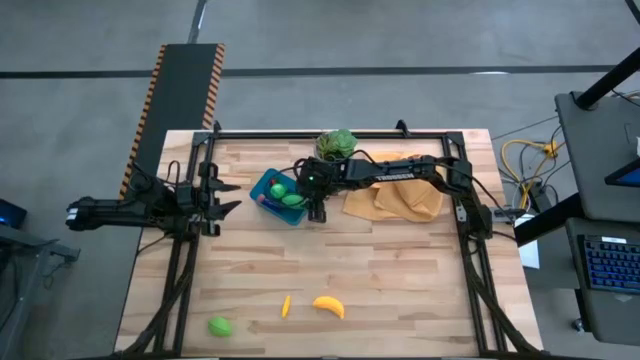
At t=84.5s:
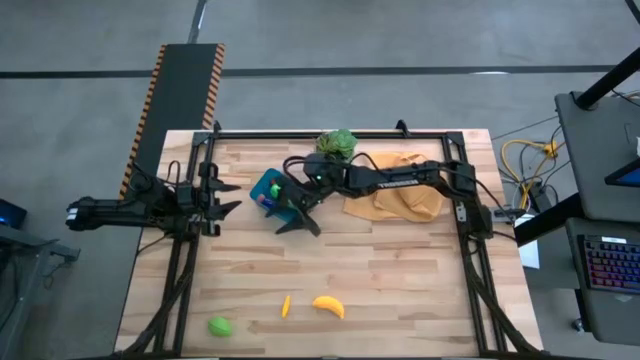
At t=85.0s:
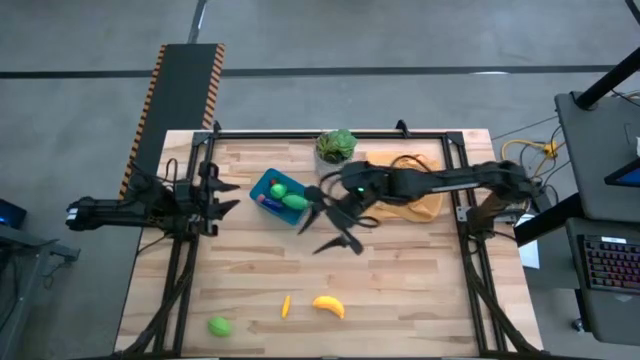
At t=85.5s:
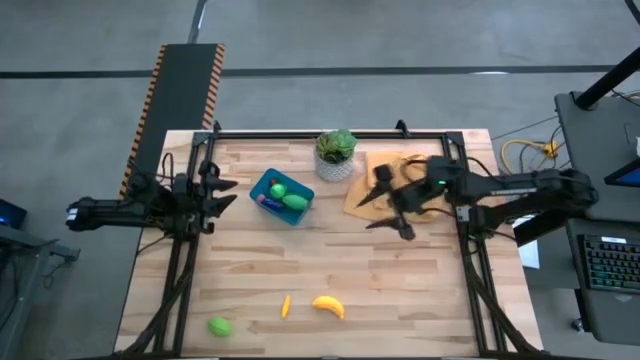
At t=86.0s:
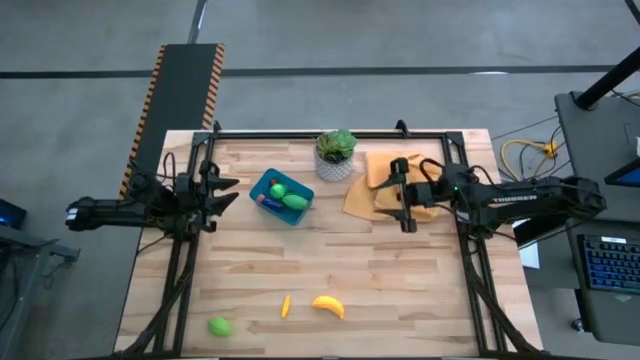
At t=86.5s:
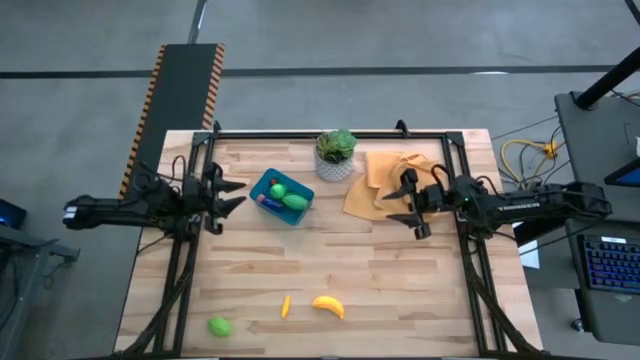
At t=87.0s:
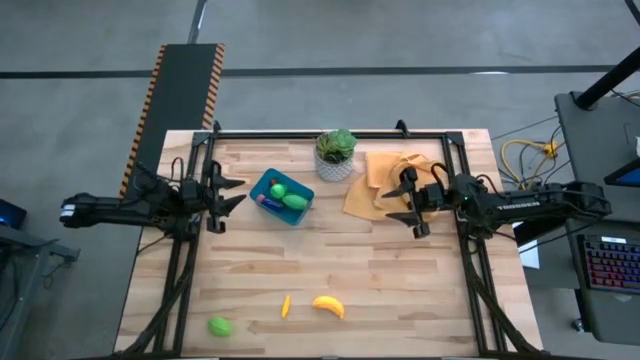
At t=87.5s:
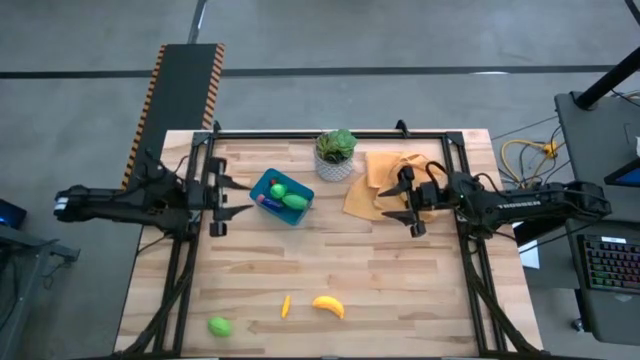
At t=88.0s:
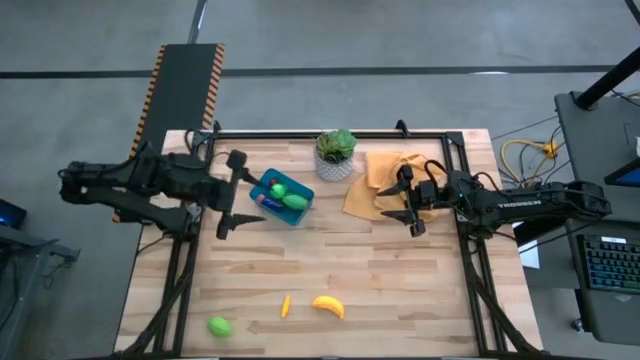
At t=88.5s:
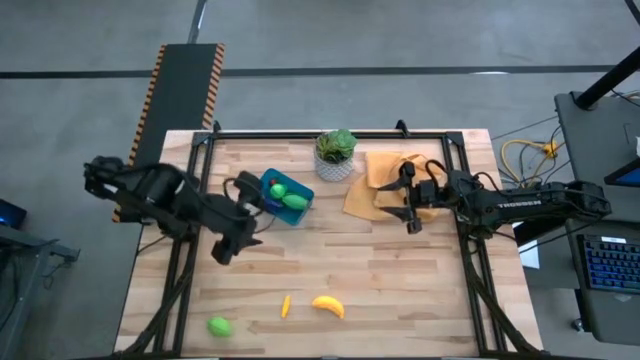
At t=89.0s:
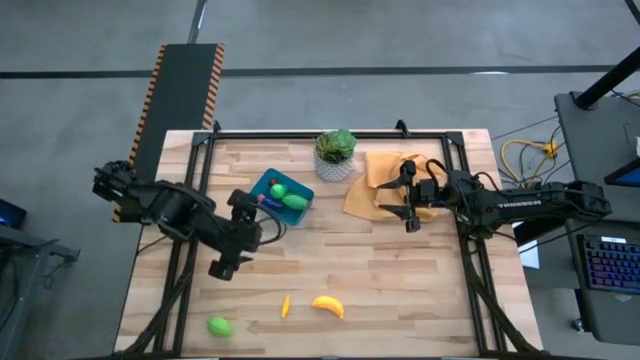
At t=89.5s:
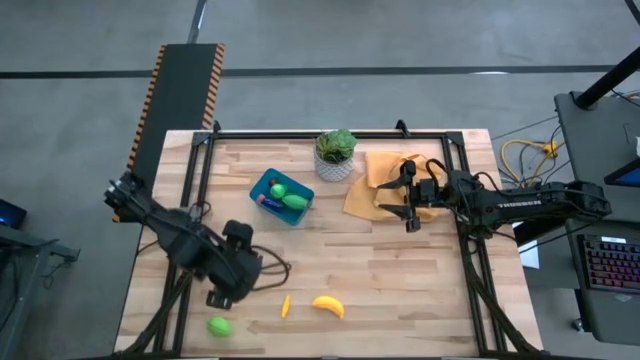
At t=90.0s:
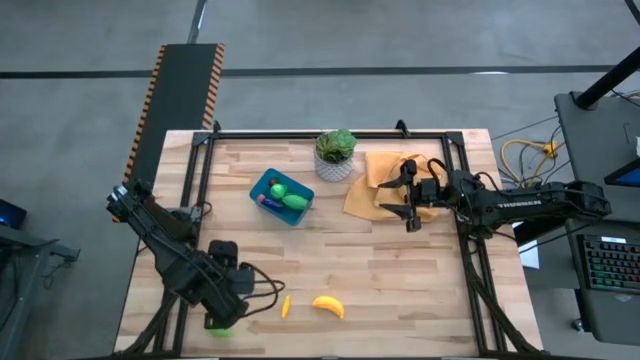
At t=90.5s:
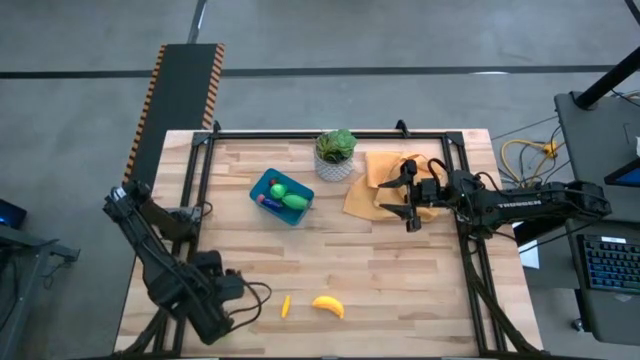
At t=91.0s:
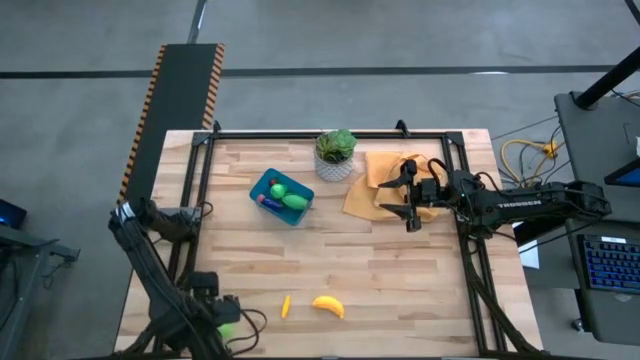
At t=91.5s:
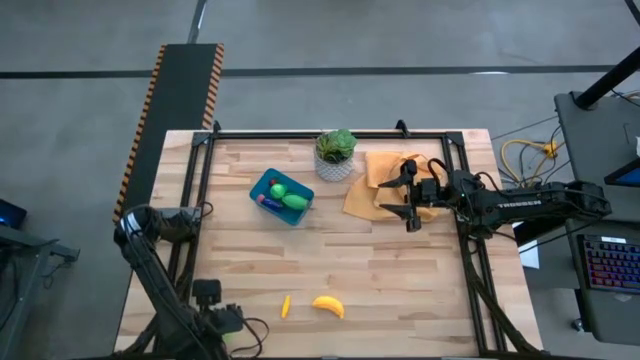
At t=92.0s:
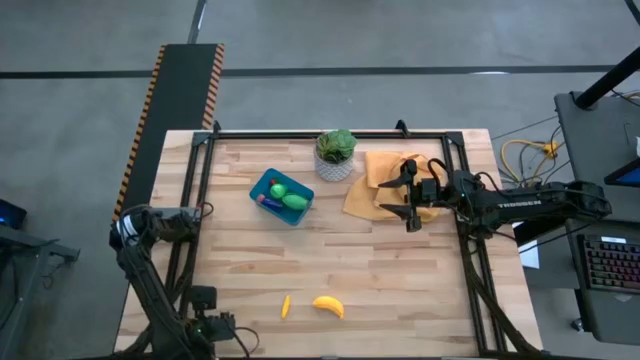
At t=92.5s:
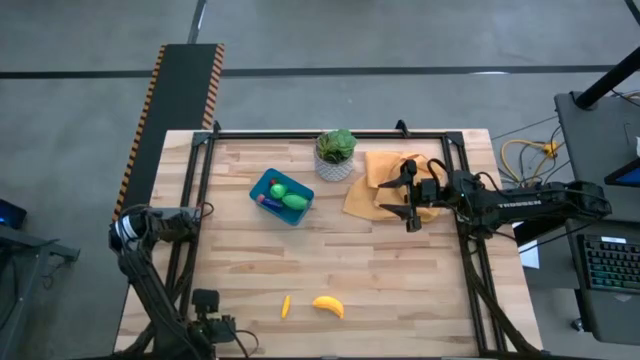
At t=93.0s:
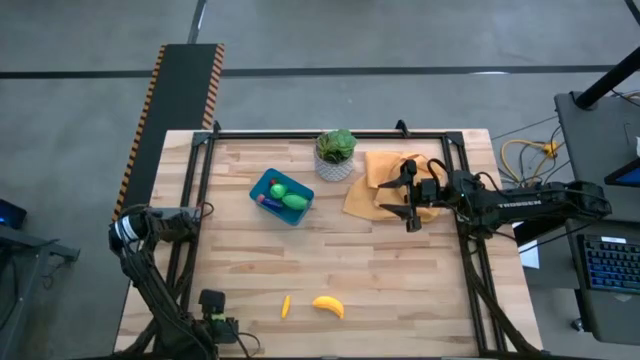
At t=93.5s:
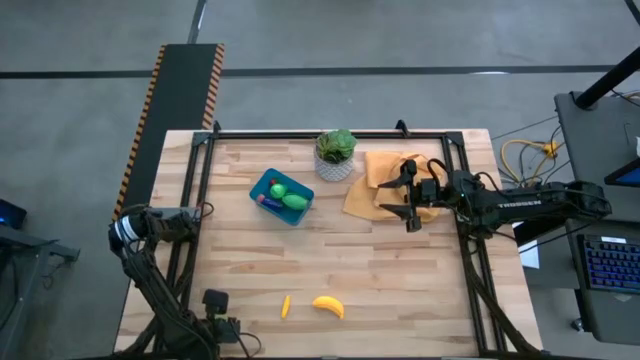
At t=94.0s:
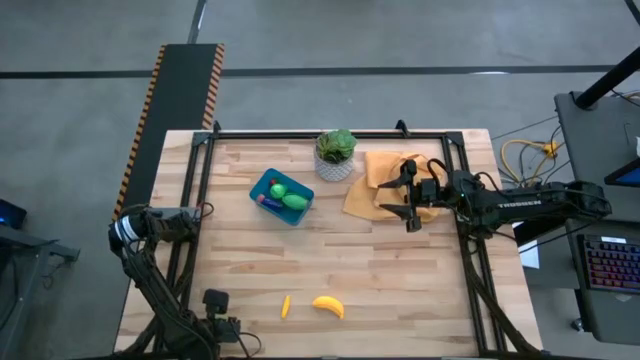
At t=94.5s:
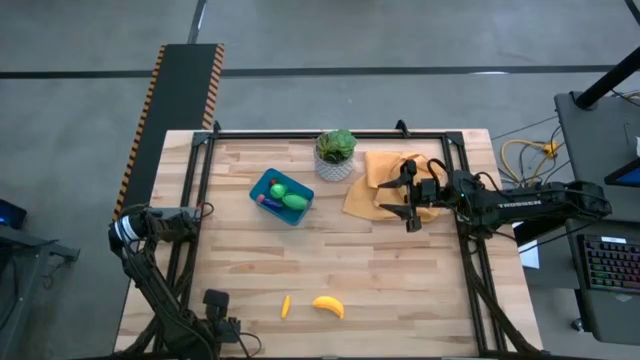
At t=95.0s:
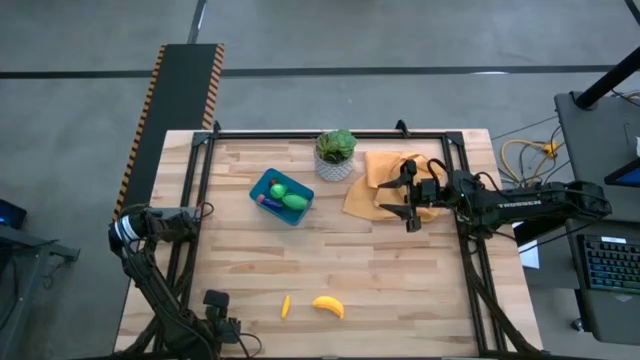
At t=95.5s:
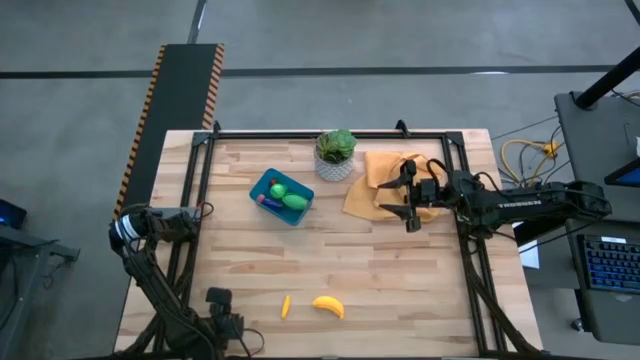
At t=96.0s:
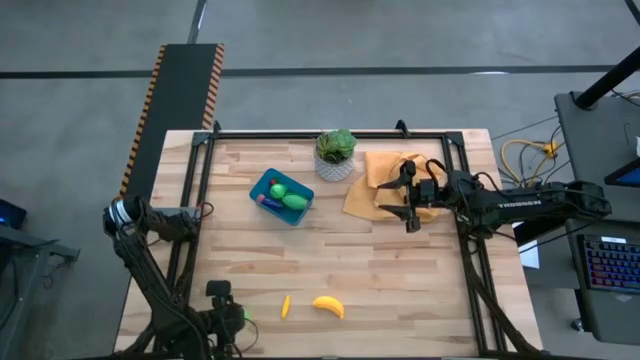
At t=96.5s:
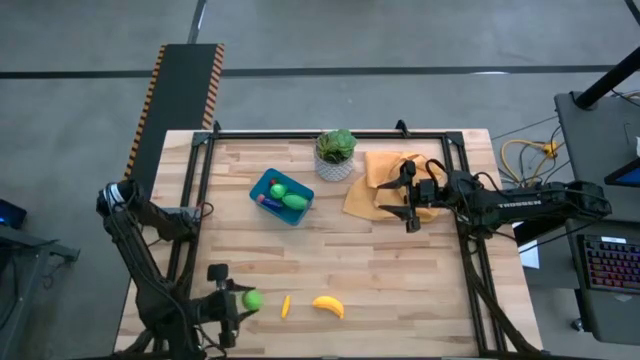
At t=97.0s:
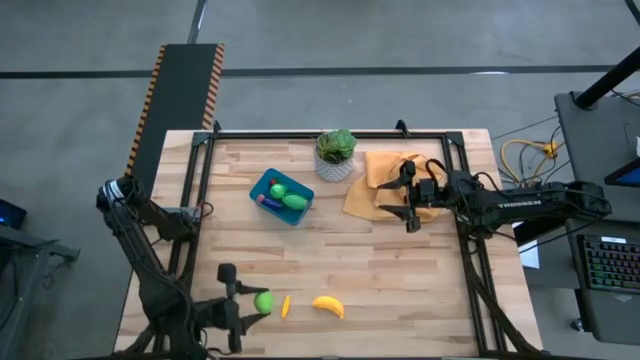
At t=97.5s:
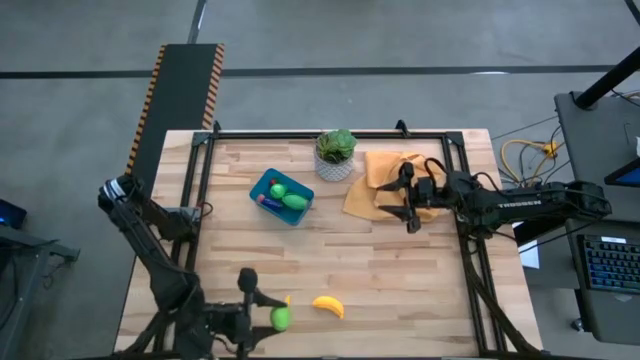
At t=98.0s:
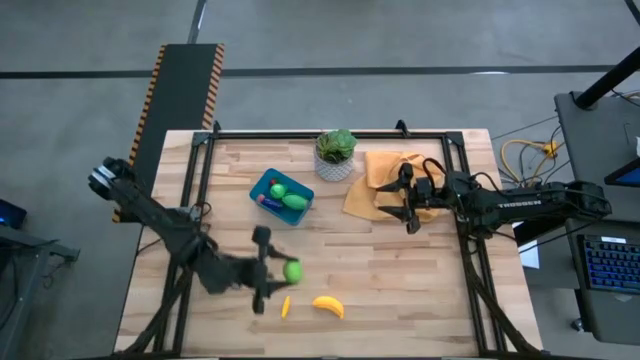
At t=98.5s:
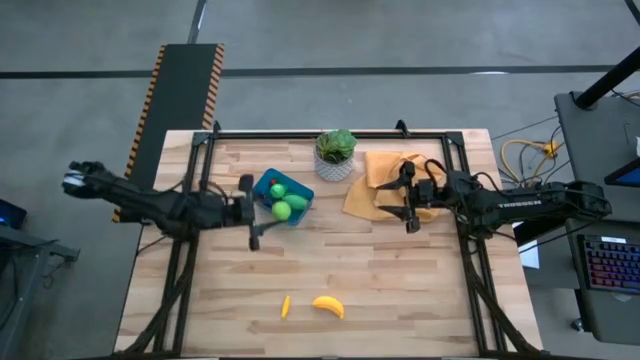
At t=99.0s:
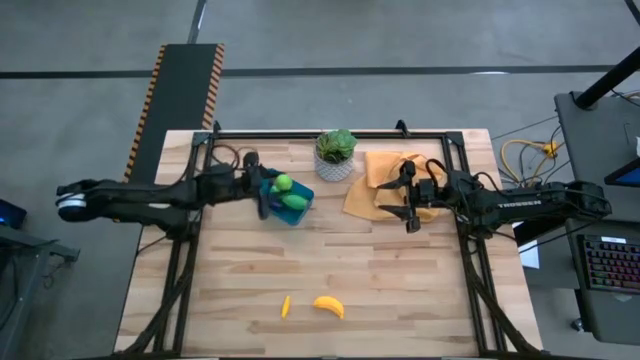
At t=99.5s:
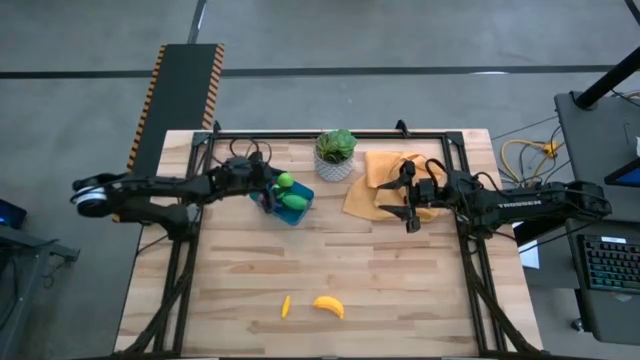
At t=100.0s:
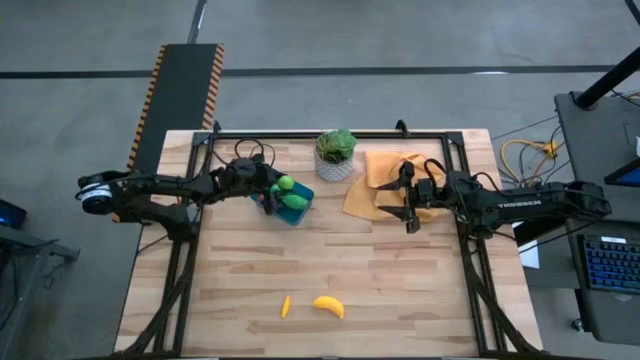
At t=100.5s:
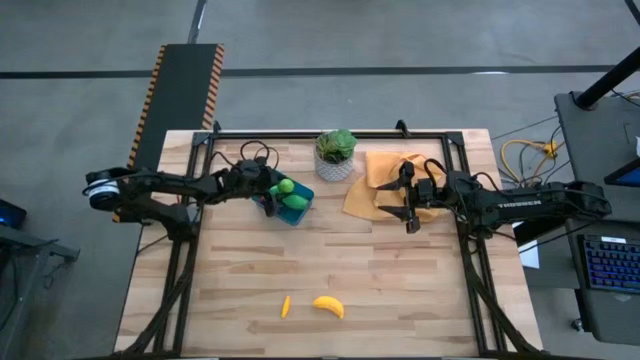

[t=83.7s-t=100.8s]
Task: Pick and placing Produce into tupperware
Put the green melon into the blue bin

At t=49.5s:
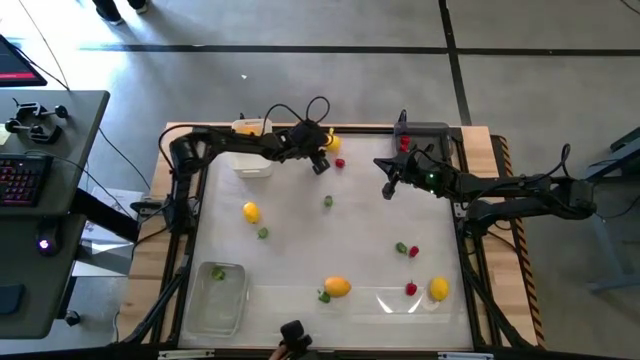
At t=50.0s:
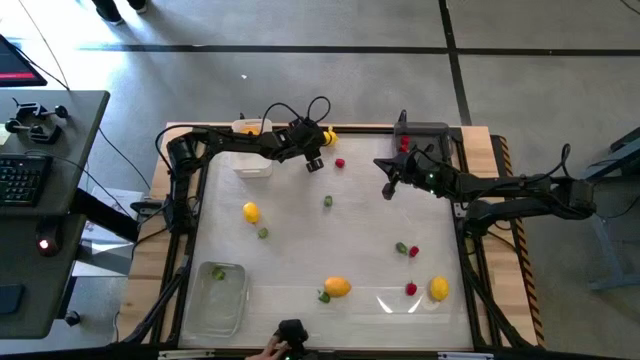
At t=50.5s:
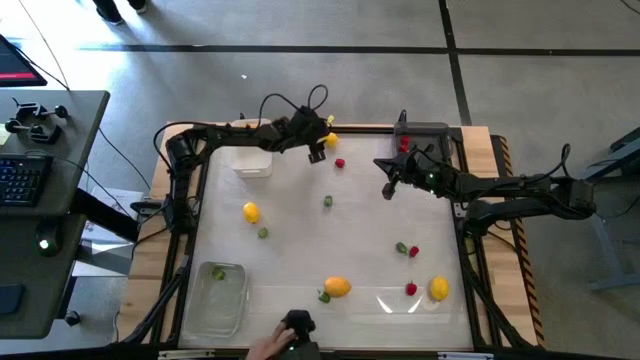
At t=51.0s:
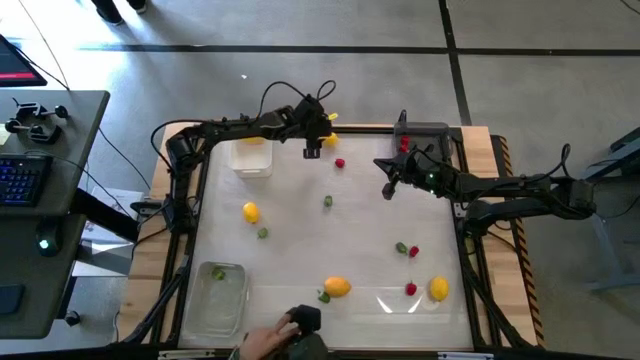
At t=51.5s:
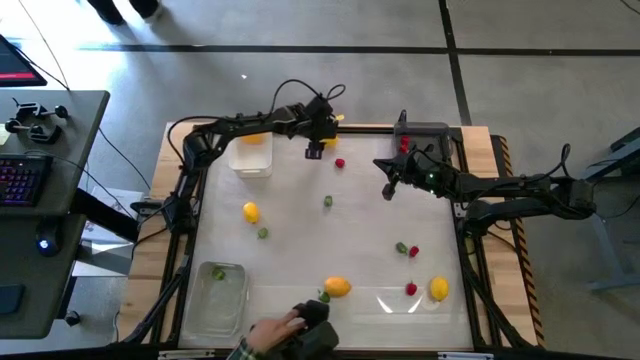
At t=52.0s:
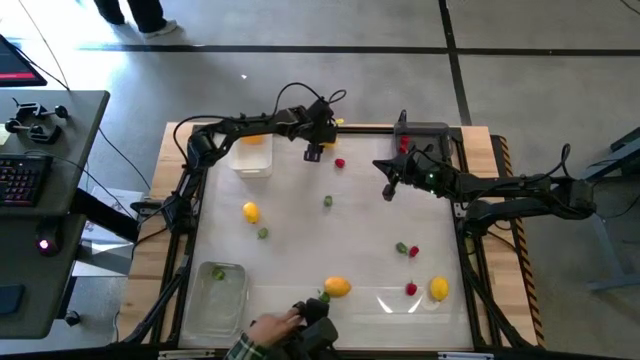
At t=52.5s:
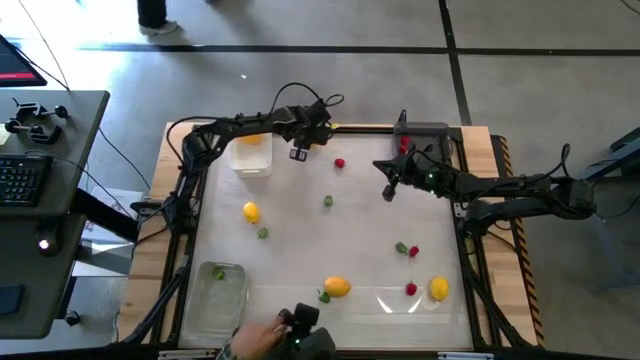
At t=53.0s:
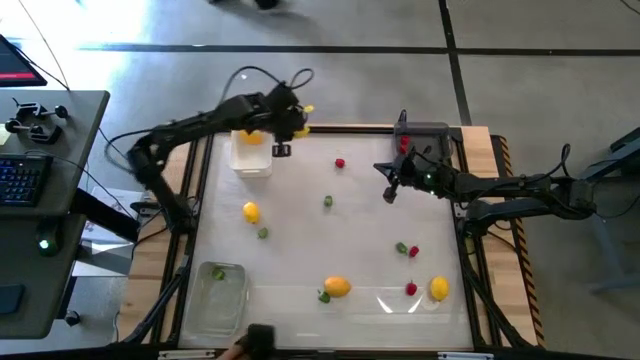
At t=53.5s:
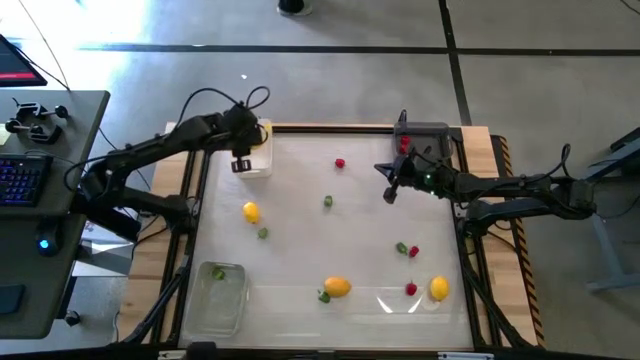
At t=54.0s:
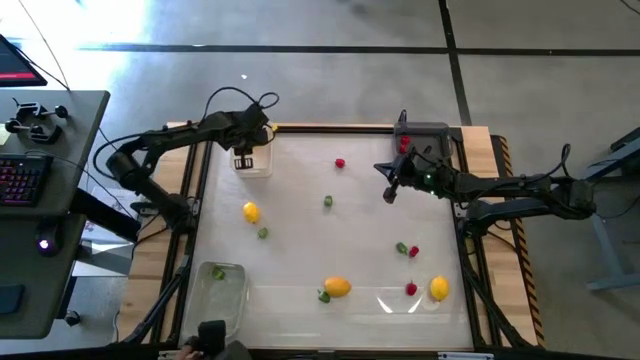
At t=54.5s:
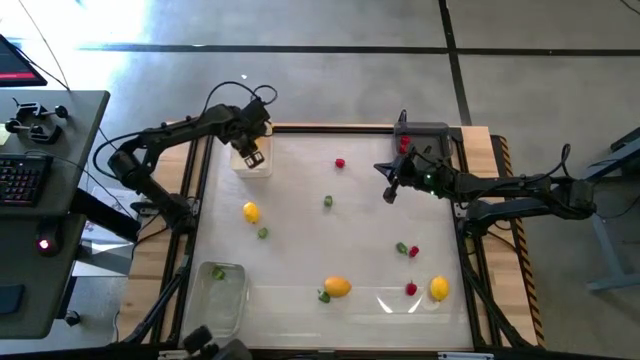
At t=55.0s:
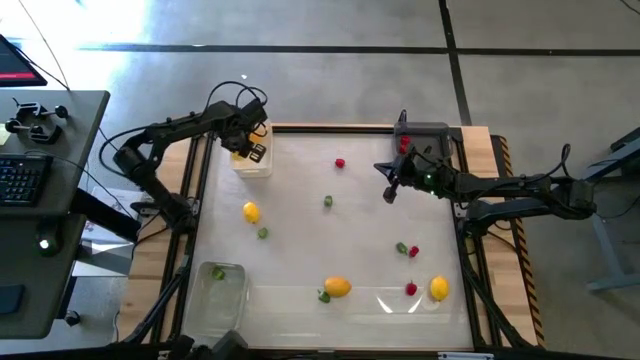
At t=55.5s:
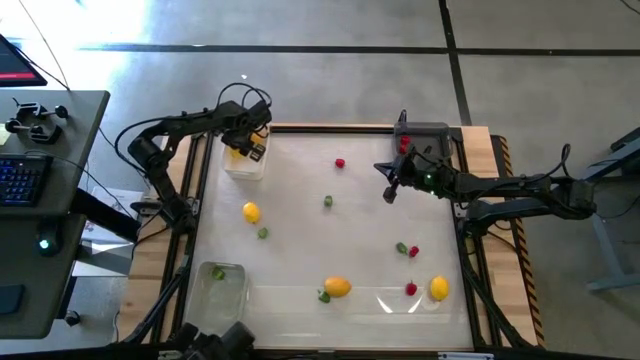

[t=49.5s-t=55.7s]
Task: Sort produce into baskets
Put the lemon into the white bin
